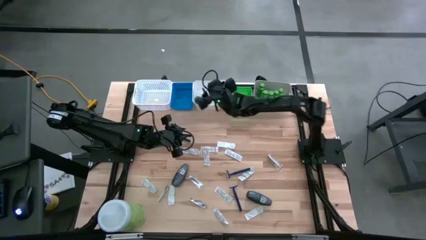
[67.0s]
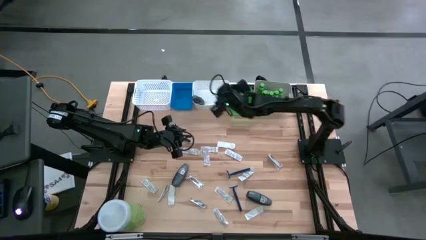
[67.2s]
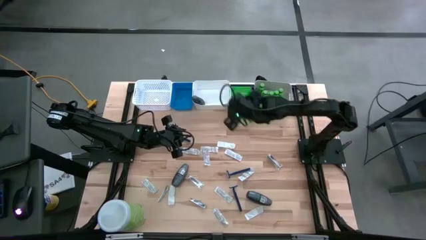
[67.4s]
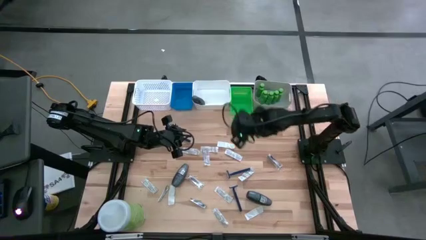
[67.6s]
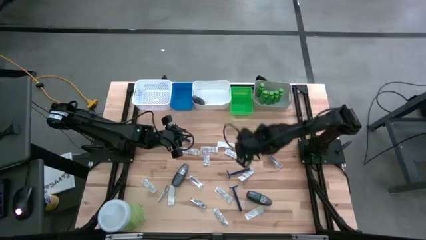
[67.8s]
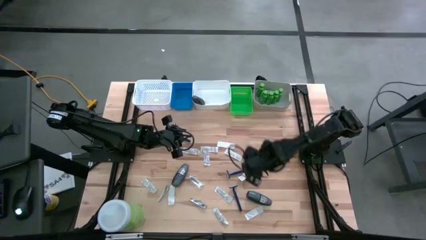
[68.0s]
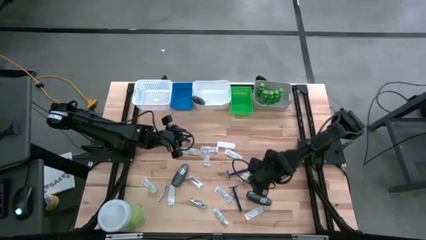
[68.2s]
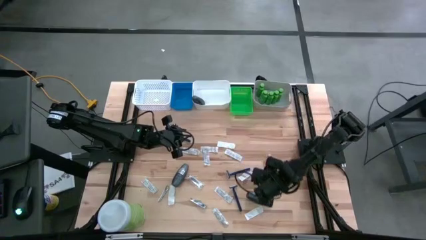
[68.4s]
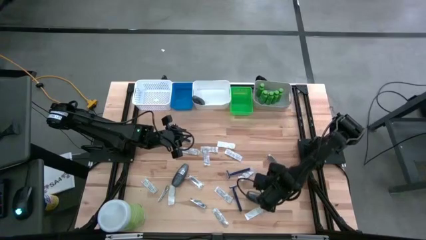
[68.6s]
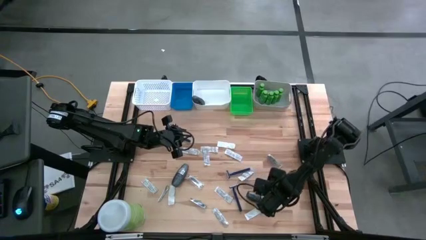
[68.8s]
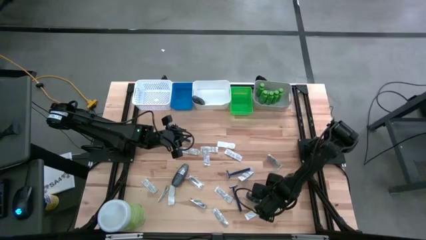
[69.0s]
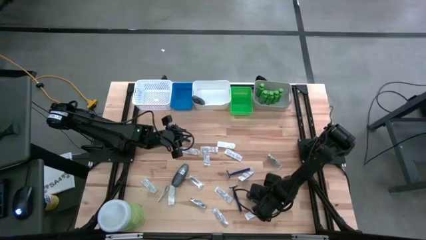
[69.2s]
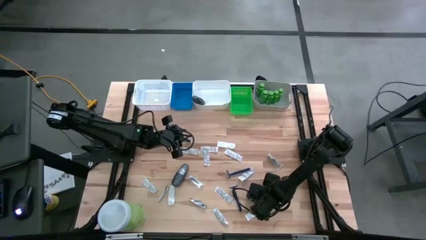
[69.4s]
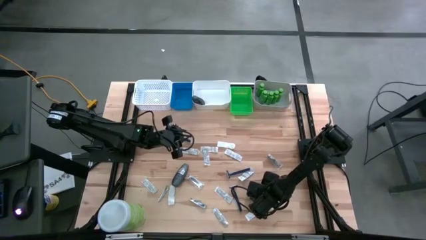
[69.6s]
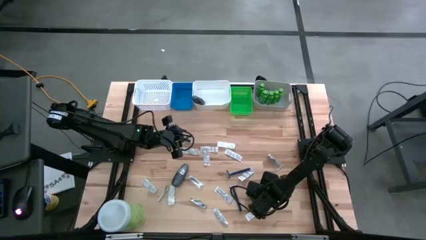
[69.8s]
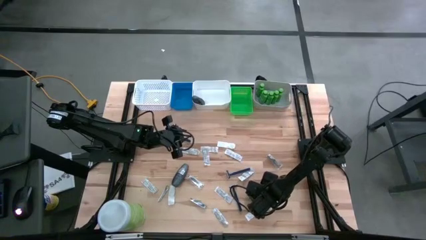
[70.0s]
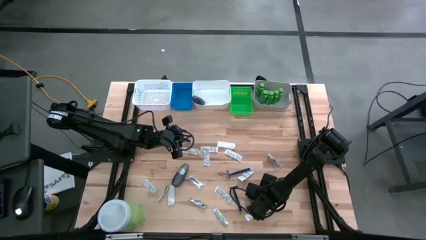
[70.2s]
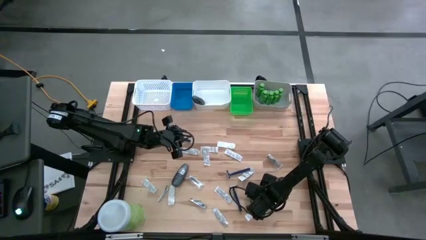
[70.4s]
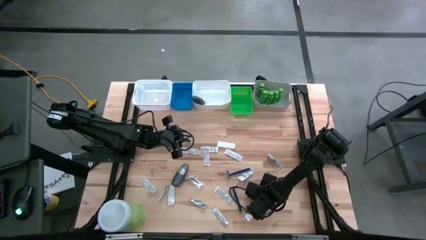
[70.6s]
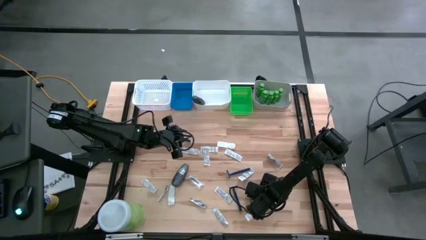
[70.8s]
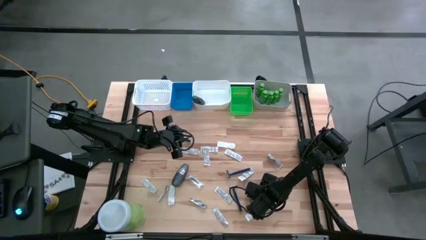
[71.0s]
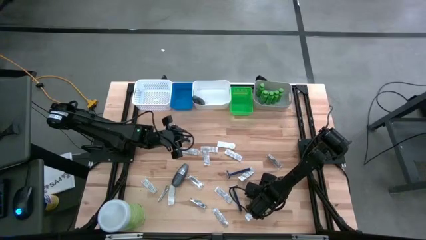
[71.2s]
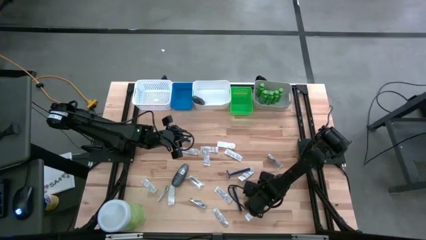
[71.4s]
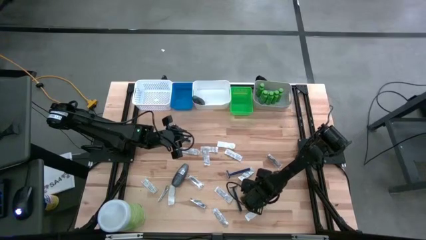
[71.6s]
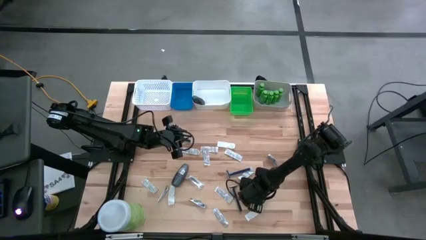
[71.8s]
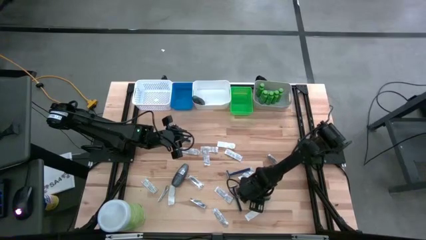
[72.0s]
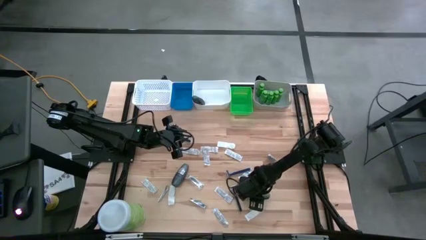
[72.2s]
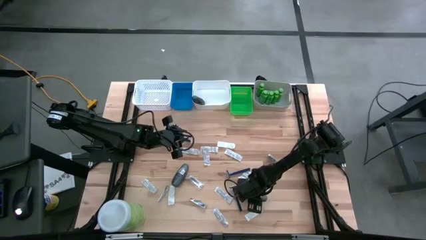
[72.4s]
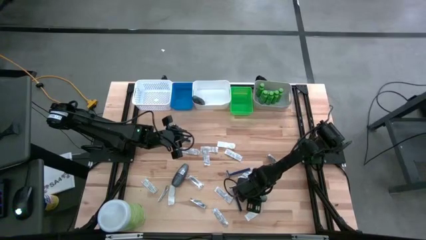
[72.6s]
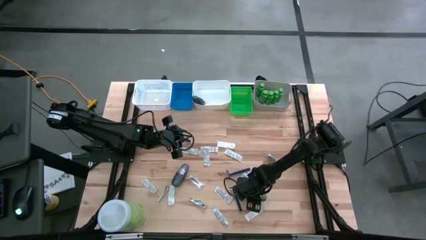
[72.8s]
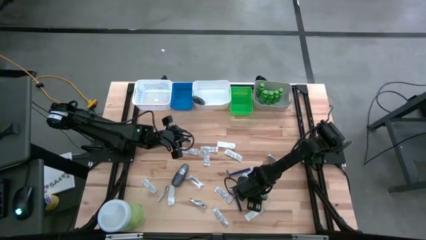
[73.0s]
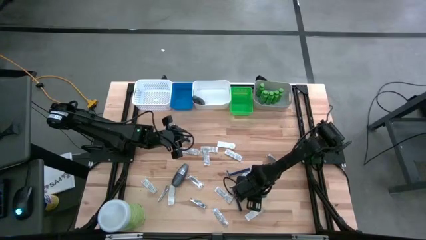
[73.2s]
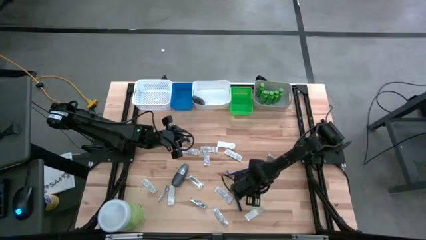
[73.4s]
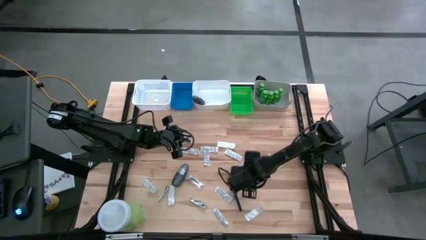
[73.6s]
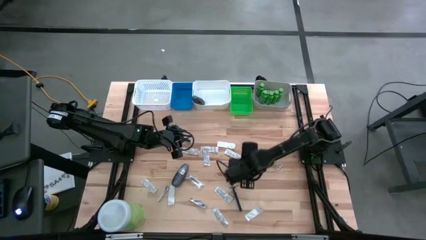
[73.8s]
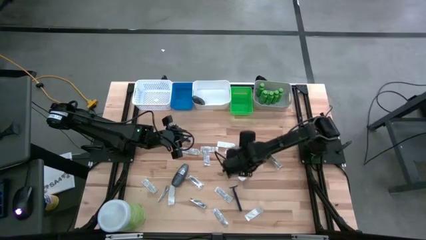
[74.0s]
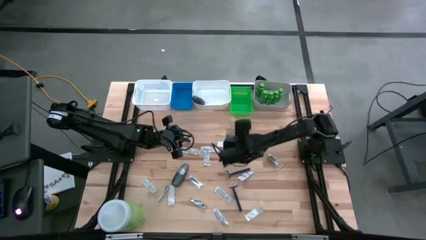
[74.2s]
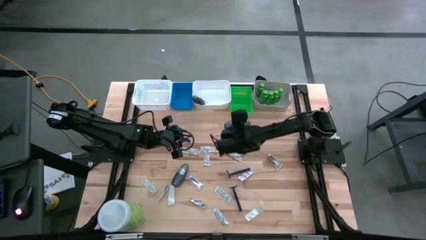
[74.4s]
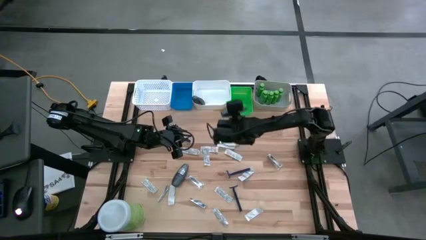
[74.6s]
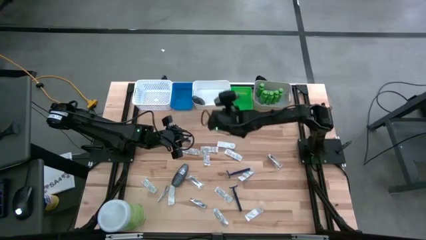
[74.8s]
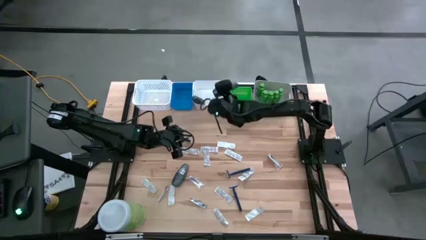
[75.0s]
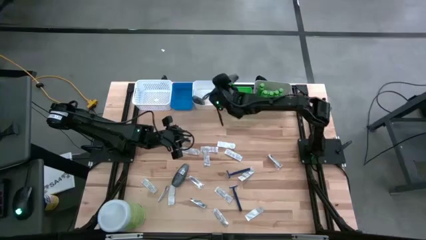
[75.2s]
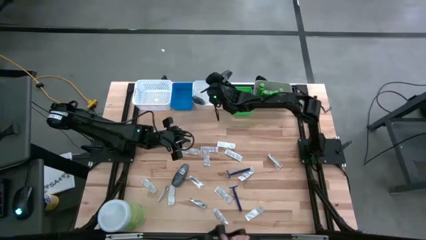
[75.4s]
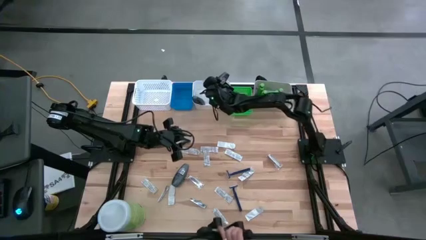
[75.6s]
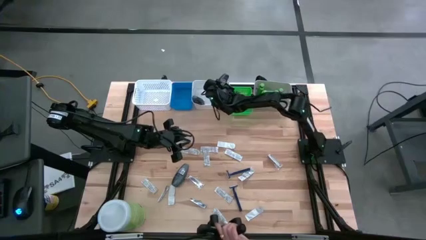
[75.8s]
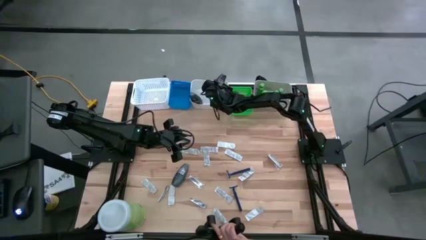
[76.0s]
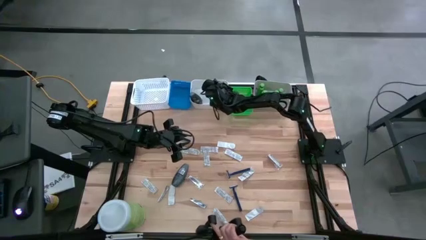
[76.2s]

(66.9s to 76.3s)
Task: Pick & Place Travel size toiletries
Put the deodorant into the right white bin

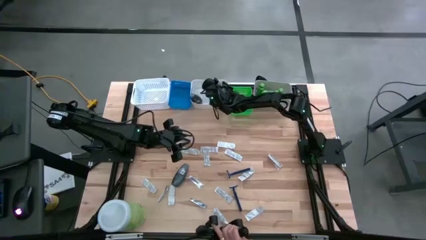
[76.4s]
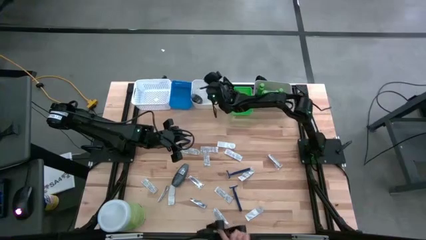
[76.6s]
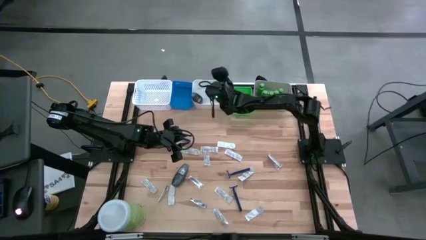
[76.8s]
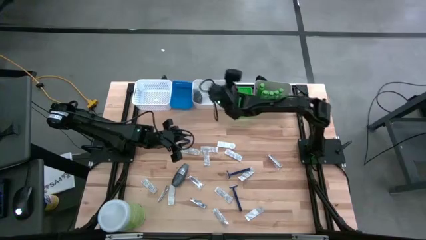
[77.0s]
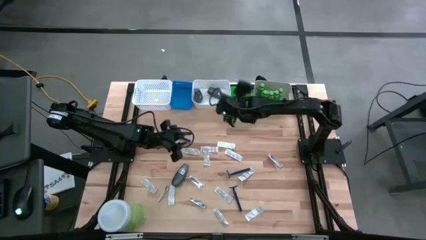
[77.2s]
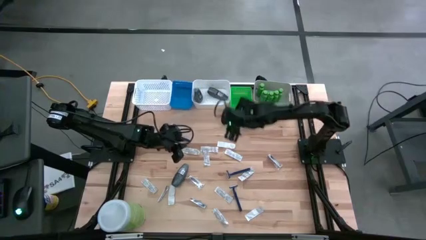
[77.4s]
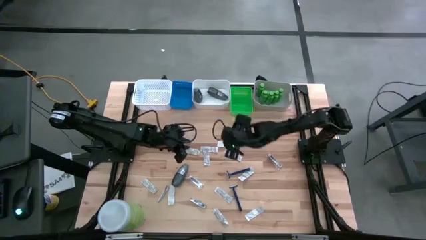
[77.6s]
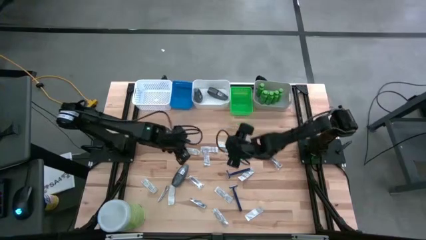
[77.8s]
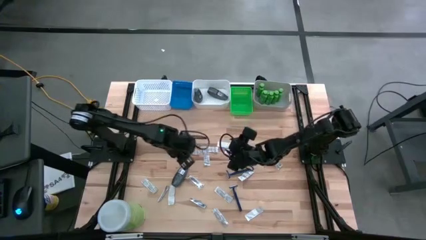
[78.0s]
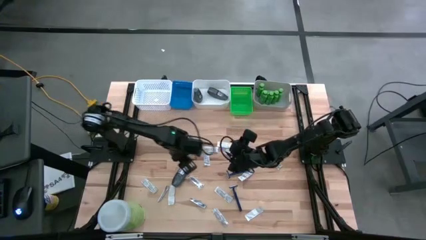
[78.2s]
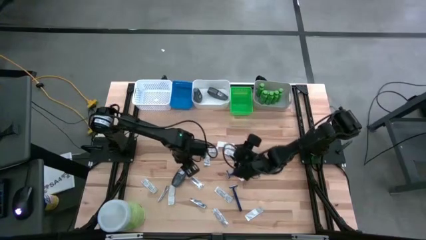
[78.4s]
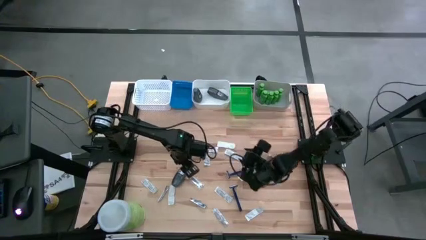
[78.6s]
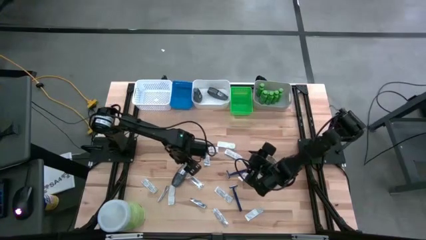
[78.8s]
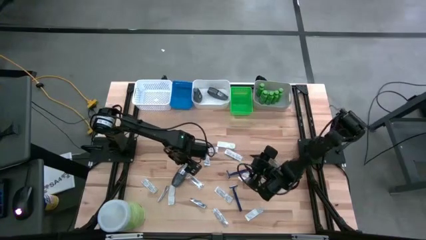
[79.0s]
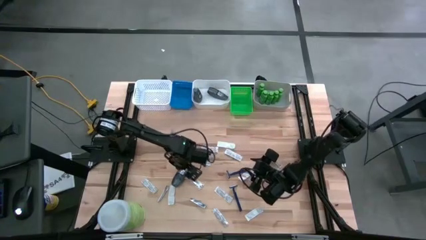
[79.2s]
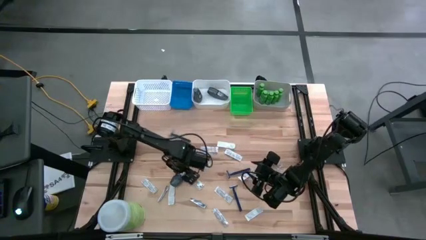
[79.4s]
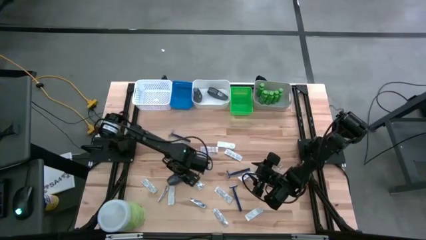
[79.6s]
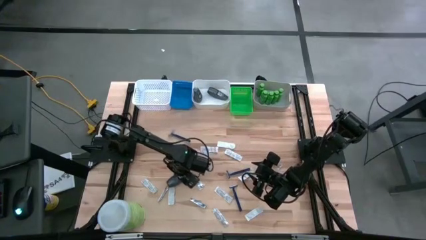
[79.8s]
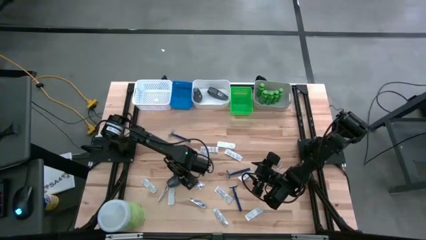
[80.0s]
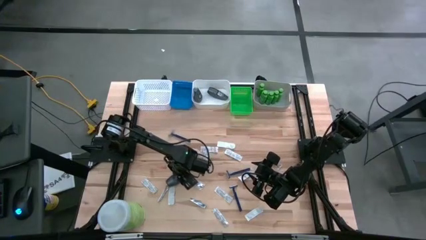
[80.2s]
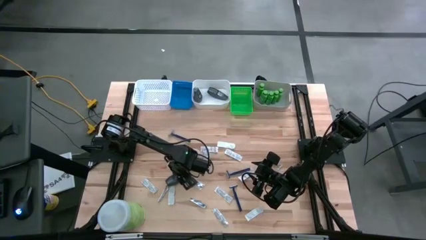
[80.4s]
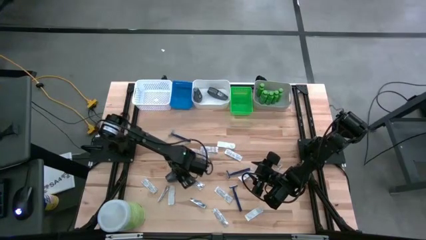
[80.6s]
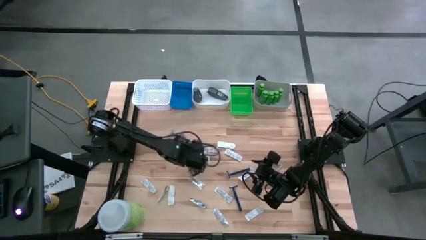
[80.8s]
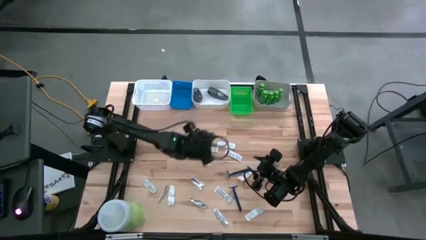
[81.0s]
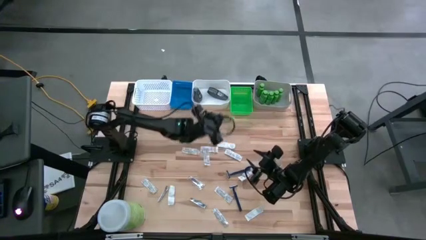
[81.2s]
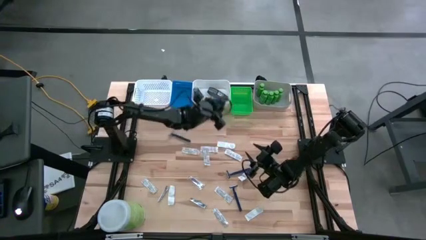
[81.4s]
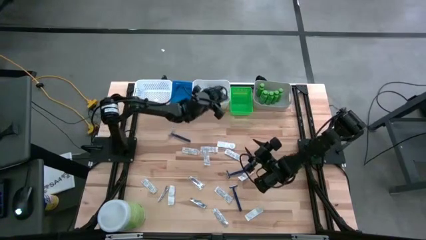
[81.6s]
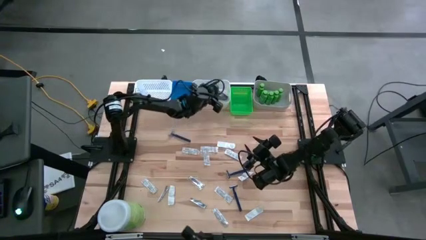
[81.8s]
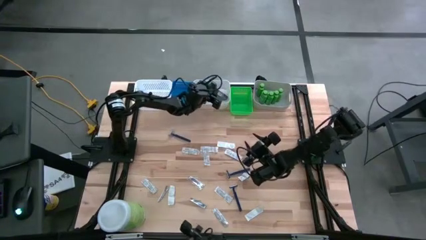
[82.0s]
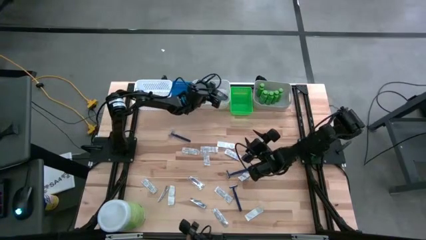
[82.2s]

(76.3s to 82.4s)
Put the deodorant into the right white bin

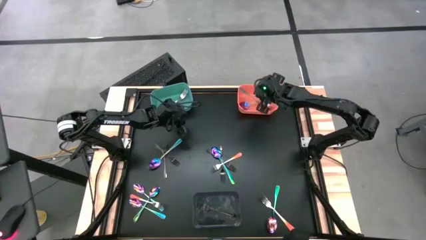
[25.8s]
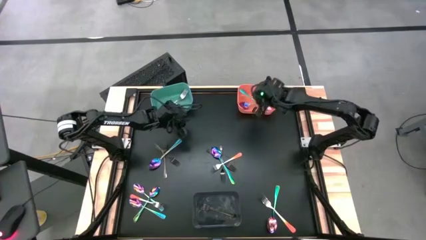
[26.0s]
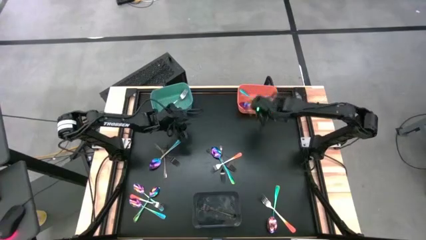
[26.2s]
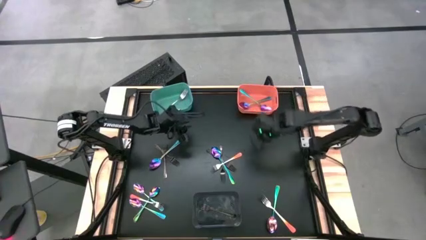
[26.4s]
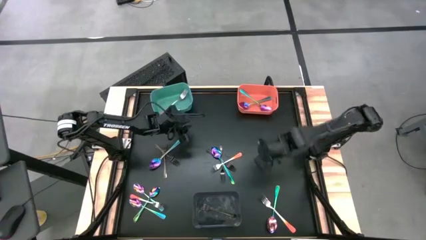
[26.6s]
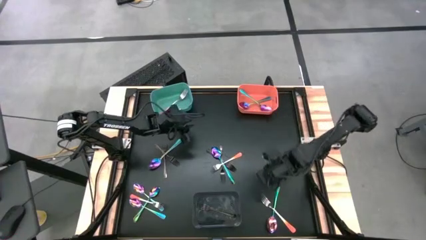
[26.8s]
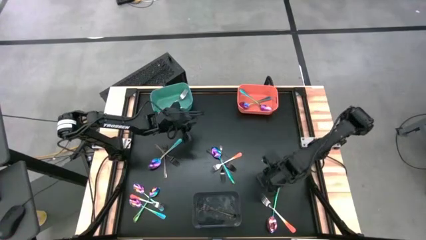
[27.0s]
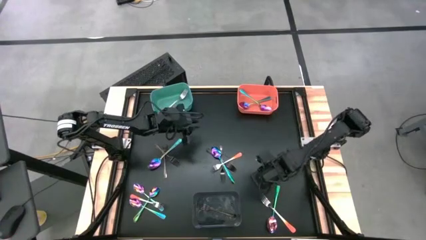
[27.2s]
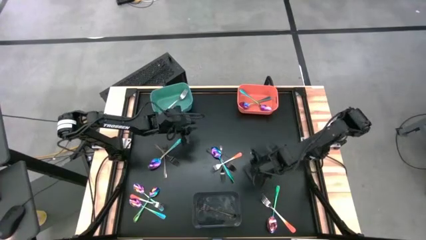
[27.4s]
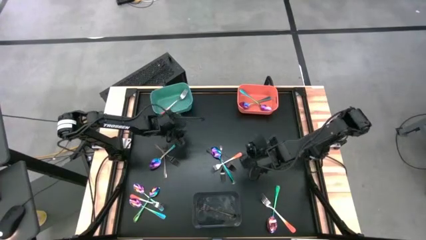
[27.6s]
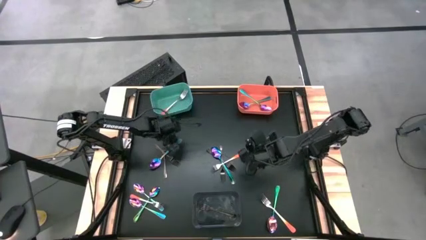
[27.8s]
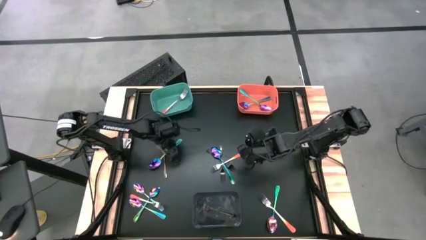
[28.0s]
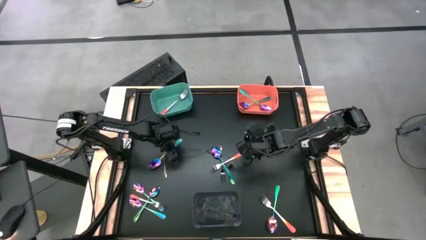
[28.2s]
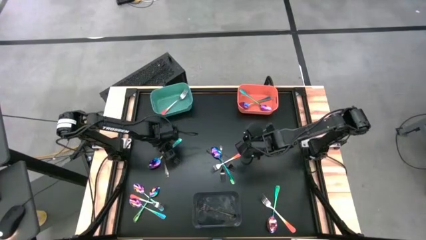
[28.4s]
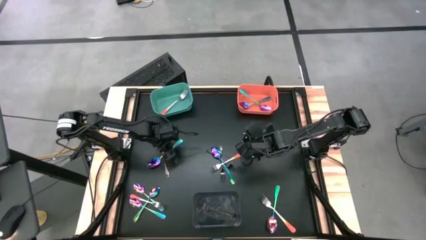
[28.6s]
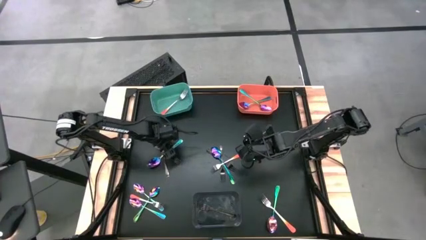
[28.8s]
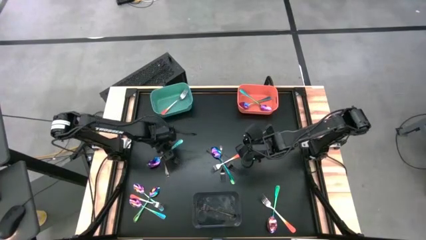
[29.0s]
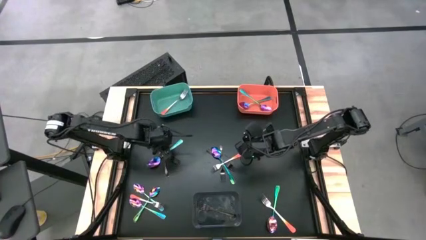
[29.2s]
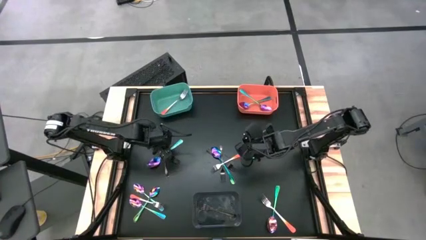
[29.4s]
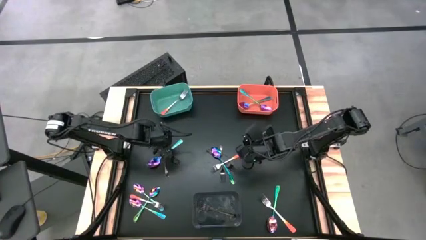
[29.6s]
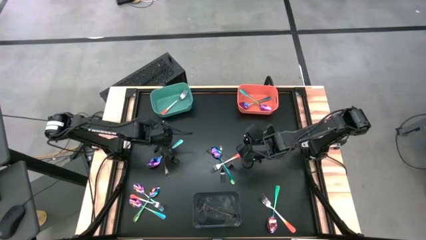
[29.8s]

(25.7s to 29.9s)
Task: Sort silverware by color (type)
Put the blue spoon into the orange bin
